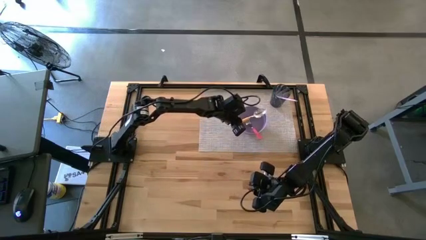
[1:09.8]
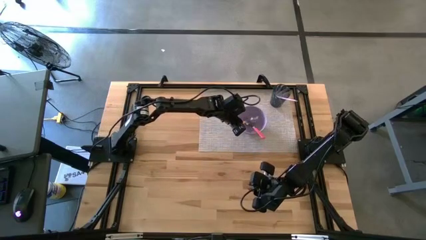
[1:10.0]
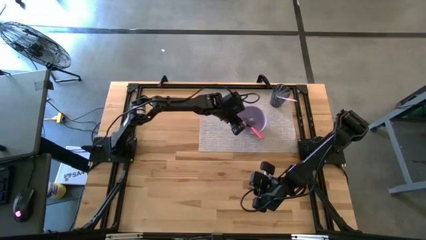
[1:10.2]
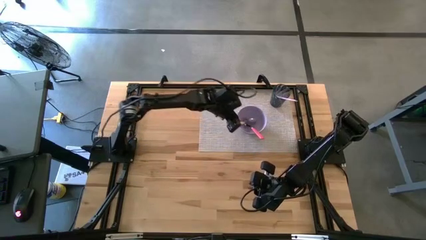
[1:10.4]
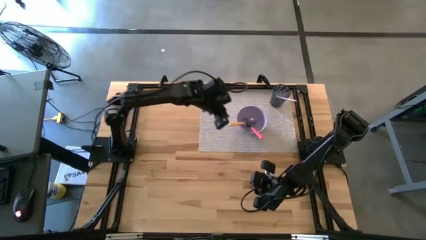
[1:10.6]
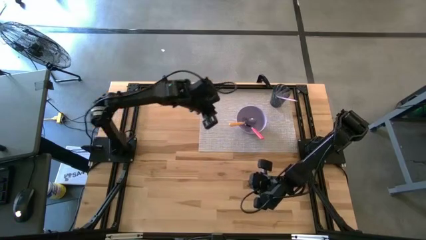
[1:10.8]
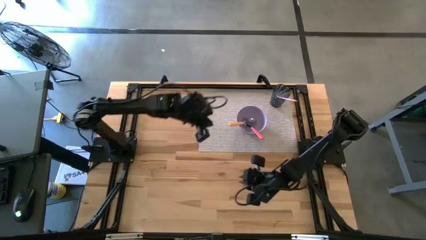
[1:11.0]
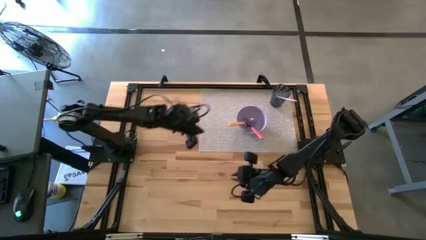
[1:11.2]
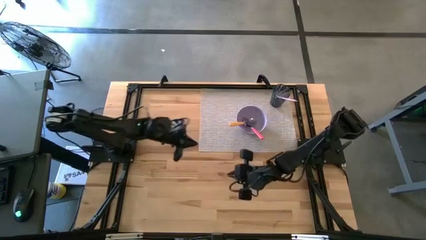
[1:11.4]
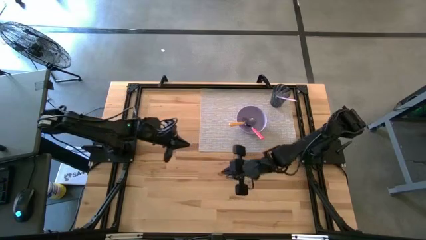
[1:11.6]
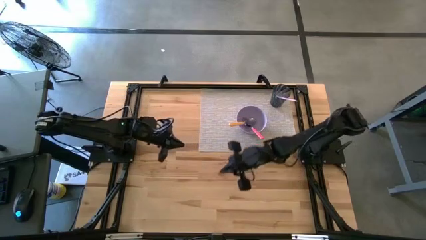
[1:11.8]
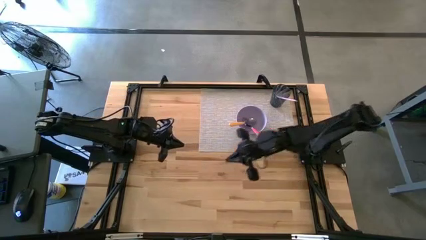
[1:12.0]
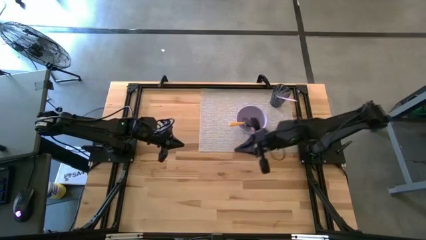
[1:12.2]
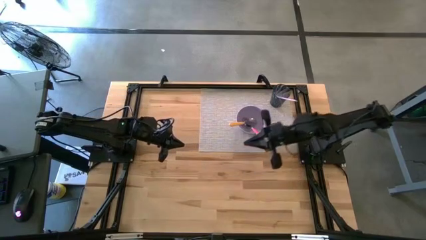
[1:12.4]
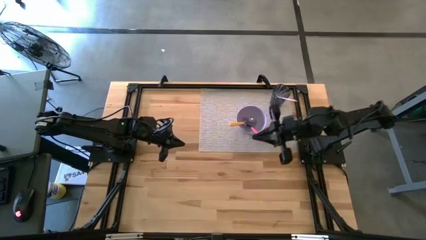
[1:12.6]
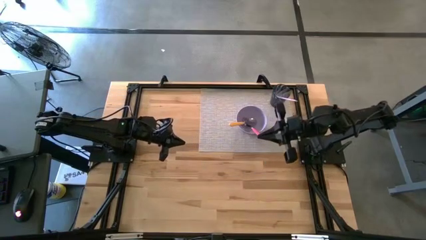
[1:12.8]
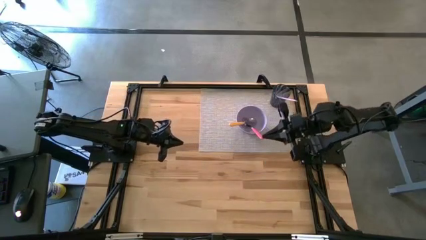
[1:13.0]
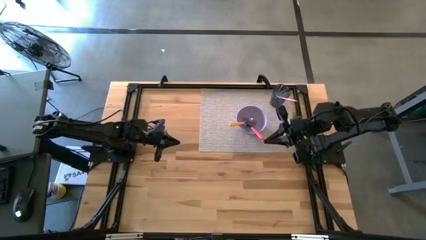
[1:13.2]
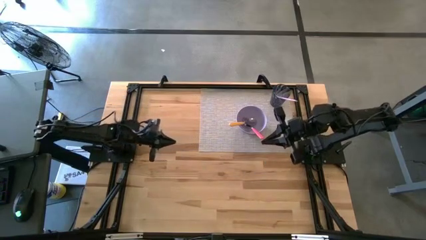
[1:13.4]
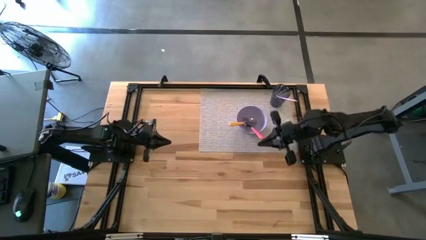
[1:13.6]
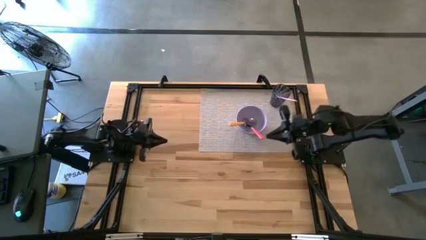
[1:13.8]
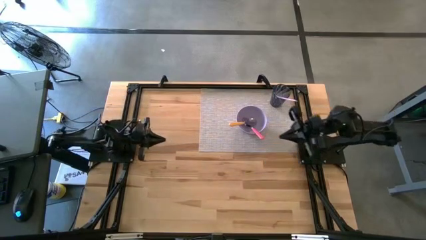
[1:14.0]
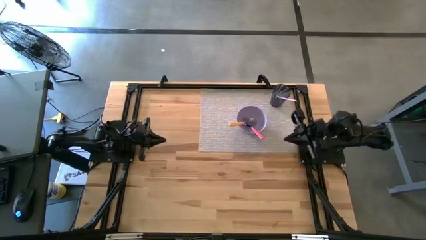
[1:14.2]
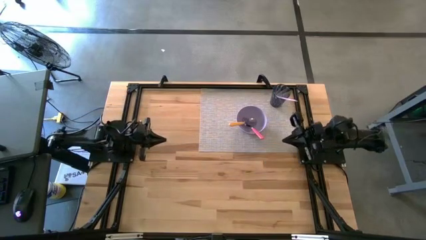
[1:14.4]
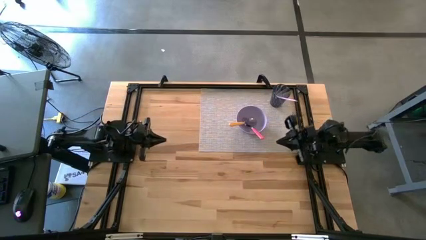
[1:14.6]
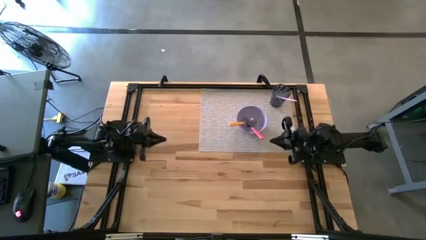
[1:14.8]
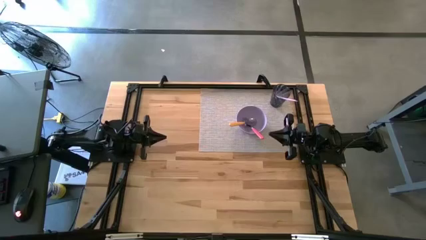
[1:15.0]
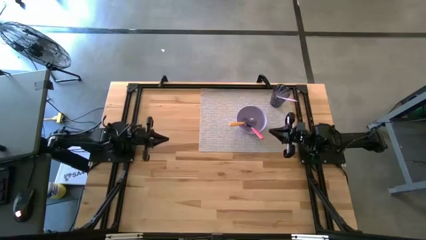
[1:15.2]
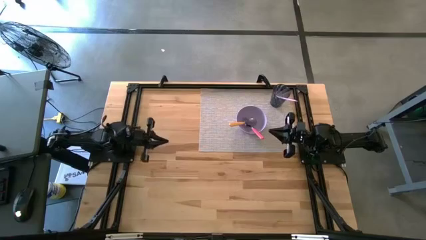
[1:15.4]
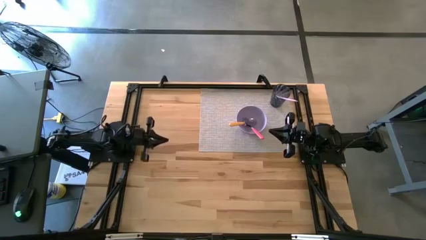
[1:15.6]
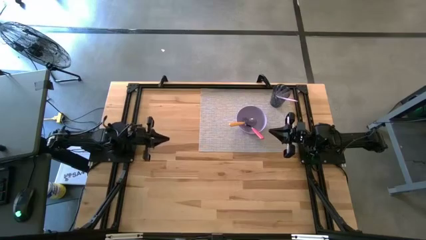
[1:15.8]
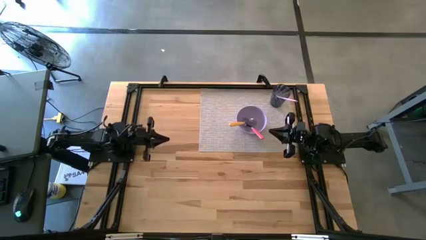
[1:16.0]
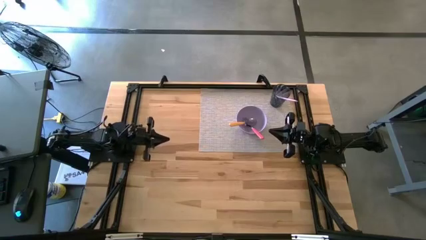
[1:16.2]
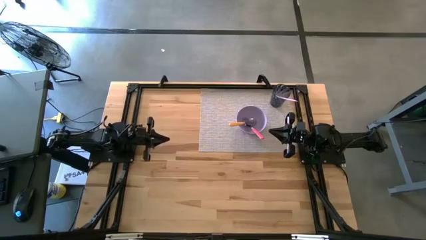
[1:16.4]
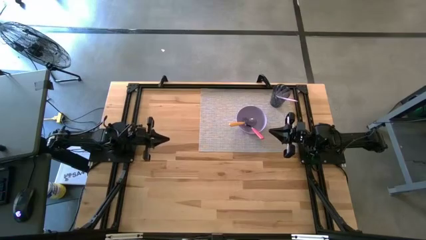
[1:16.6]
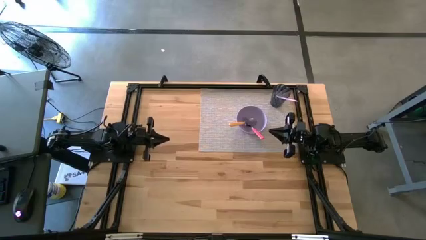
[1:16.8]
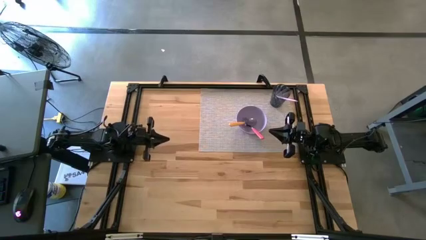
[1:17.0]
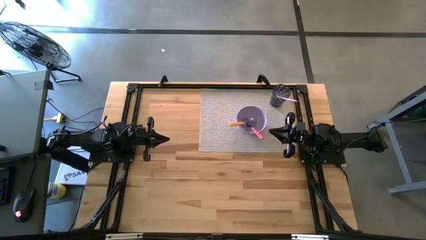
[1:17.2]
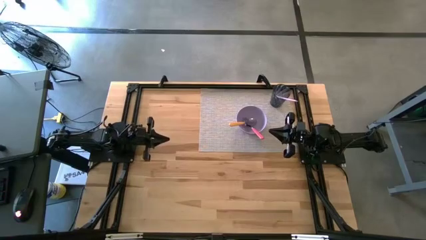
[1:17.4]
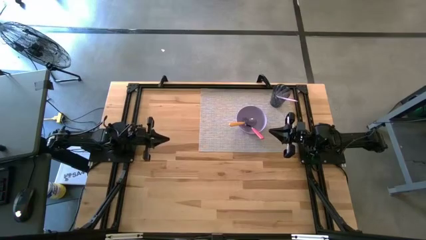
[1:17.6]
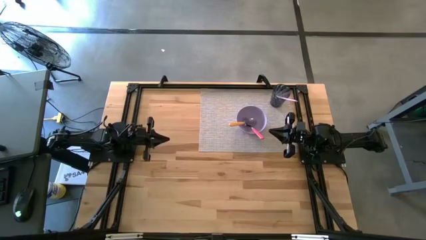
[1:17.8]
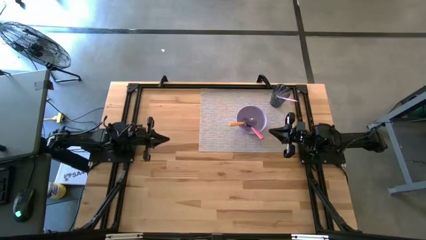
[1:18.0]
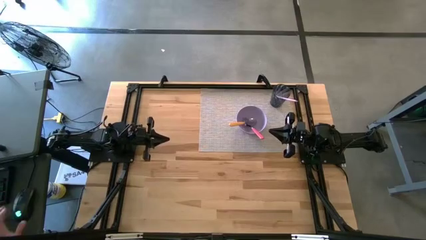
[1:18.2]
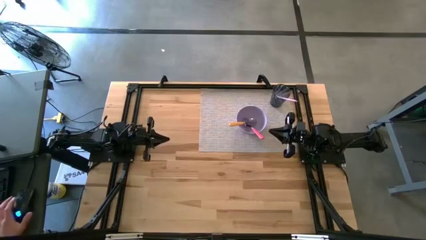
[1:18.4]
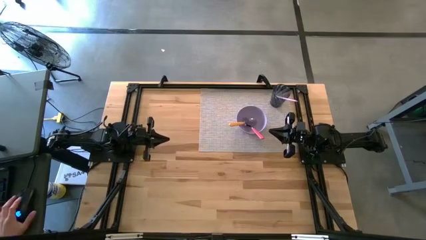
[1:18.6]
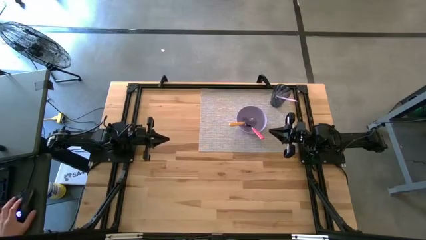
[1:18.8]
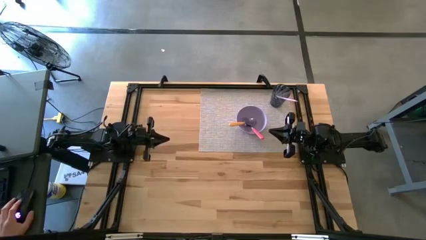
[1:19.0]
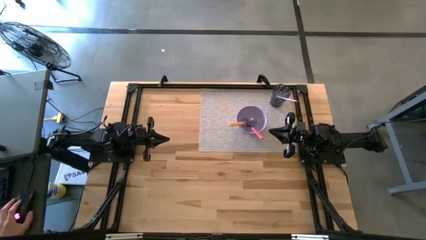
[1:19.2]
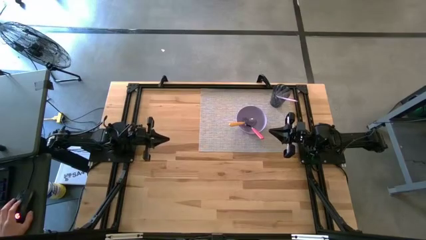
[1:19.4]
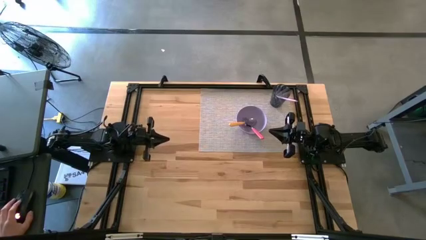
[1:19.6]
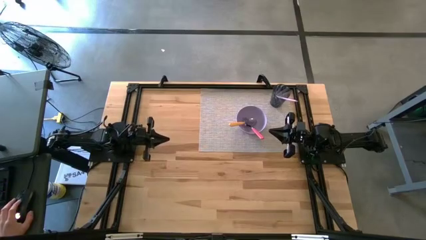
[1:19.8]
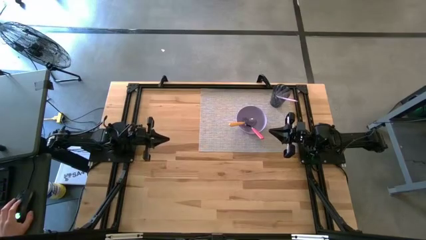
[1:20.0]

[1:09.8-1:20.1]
Task: Pick & Place Utensil
Return to Home Position
